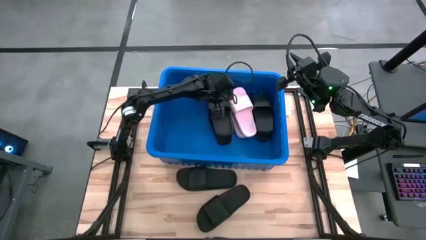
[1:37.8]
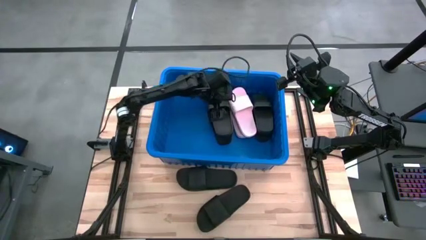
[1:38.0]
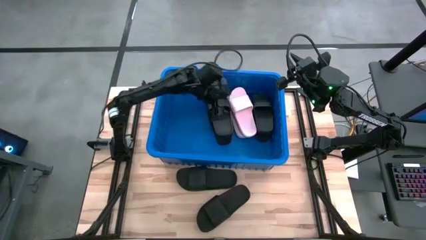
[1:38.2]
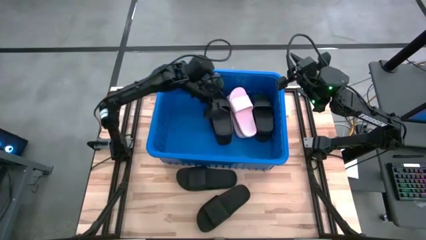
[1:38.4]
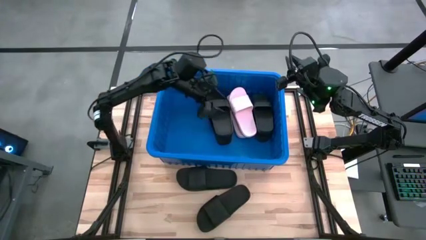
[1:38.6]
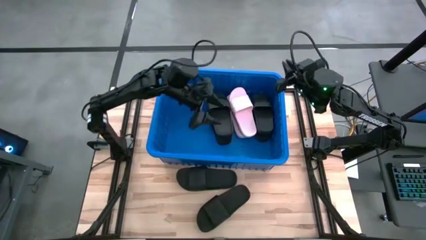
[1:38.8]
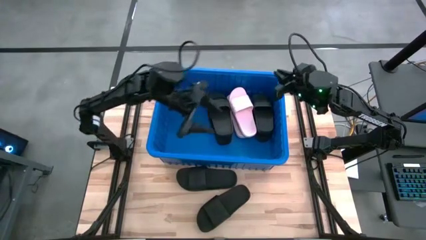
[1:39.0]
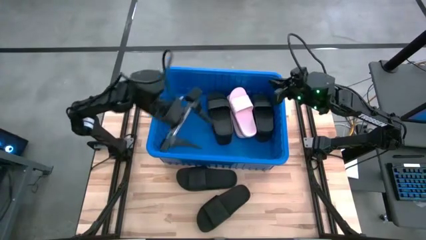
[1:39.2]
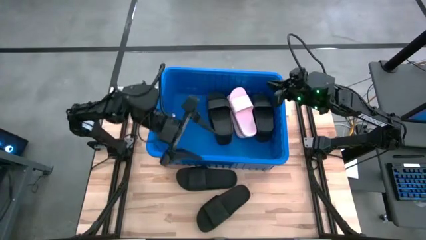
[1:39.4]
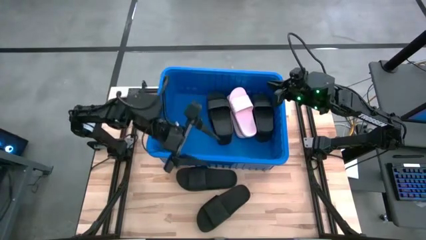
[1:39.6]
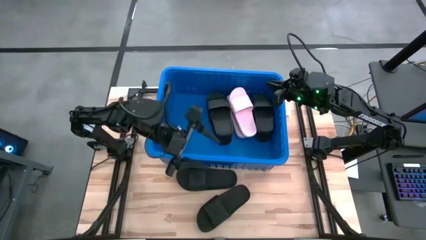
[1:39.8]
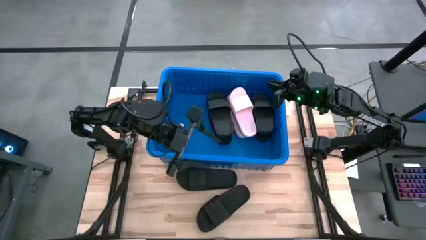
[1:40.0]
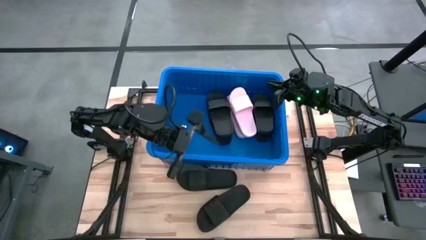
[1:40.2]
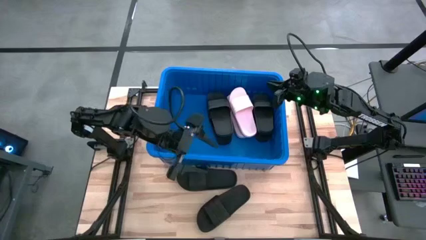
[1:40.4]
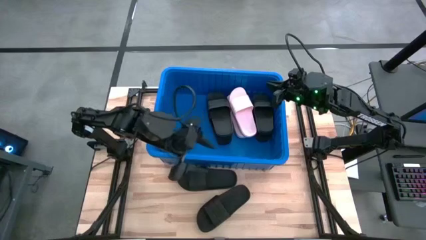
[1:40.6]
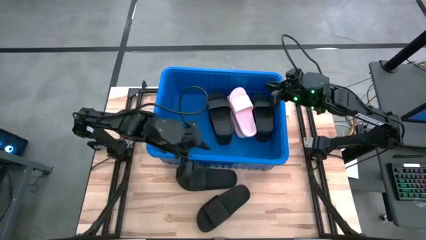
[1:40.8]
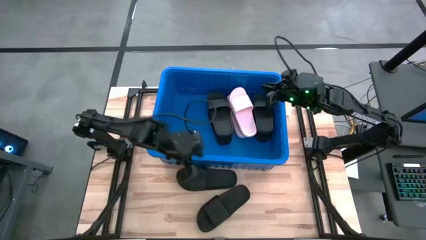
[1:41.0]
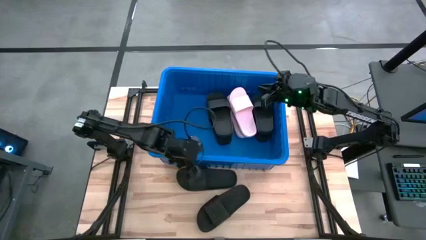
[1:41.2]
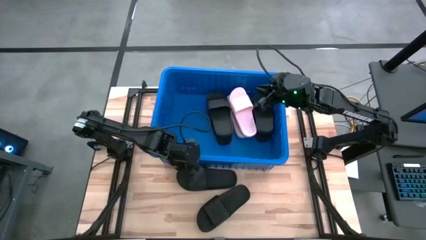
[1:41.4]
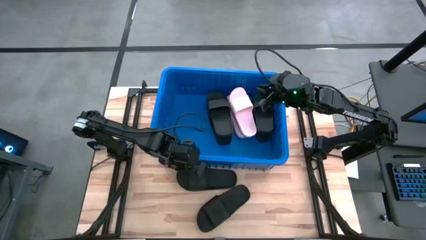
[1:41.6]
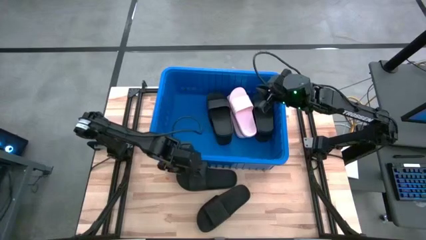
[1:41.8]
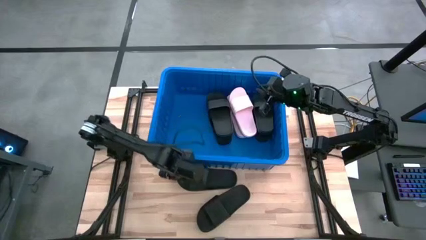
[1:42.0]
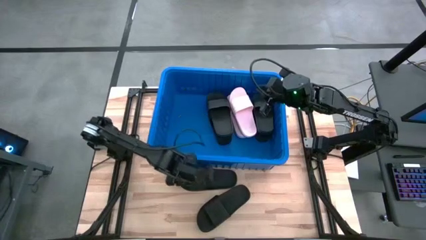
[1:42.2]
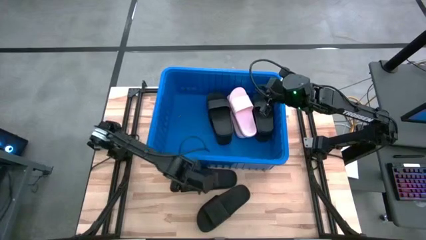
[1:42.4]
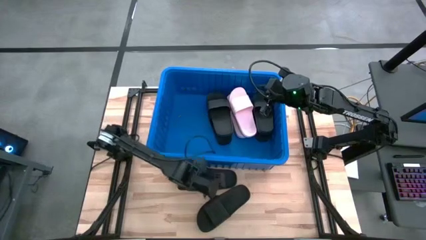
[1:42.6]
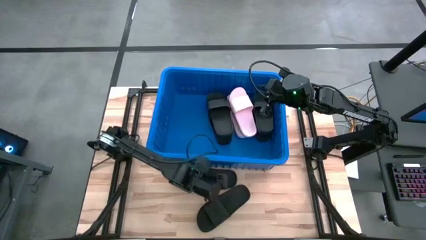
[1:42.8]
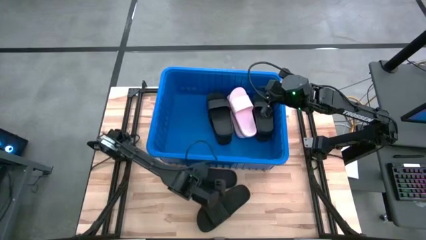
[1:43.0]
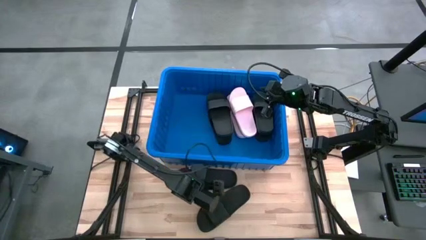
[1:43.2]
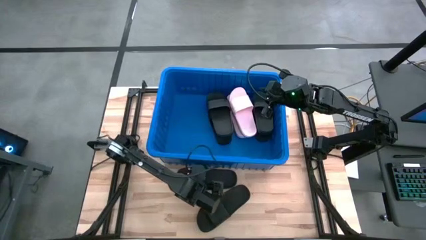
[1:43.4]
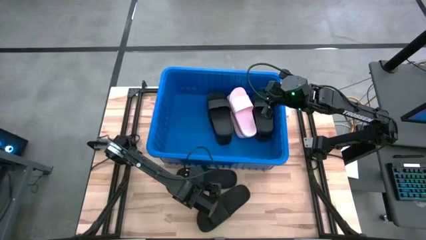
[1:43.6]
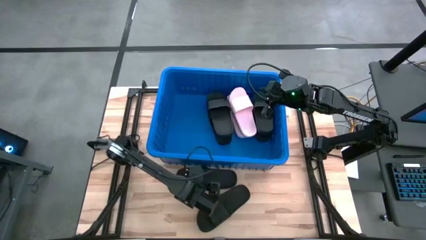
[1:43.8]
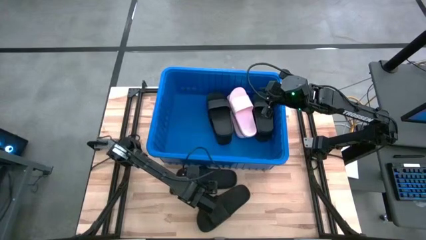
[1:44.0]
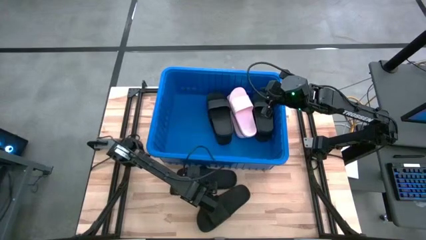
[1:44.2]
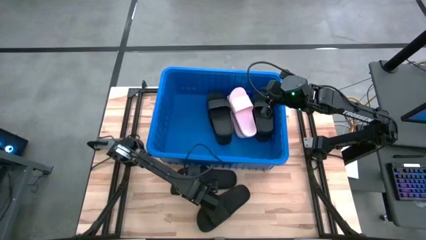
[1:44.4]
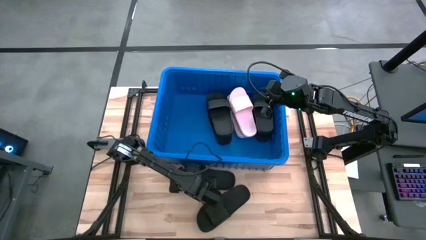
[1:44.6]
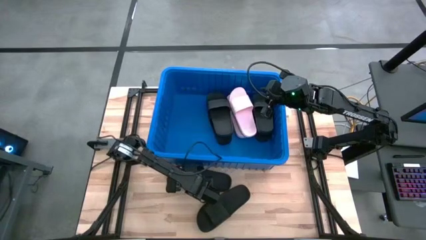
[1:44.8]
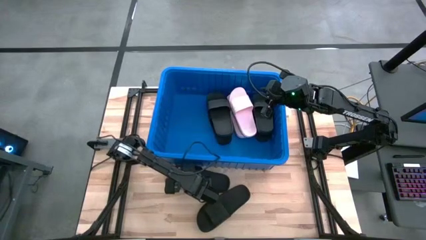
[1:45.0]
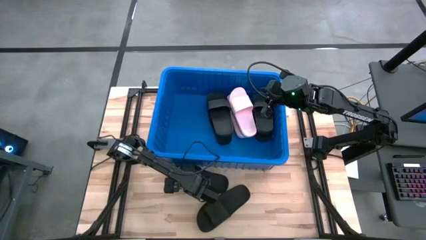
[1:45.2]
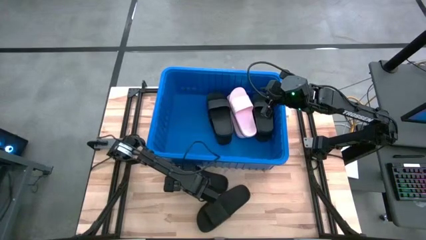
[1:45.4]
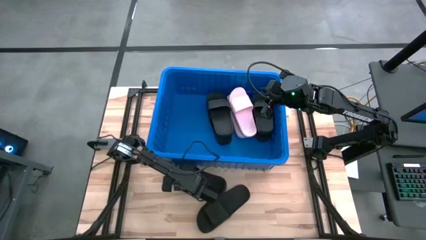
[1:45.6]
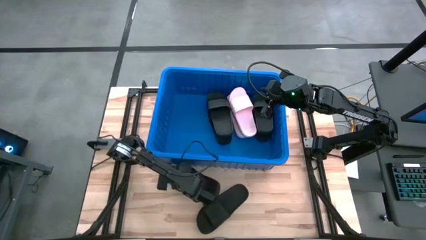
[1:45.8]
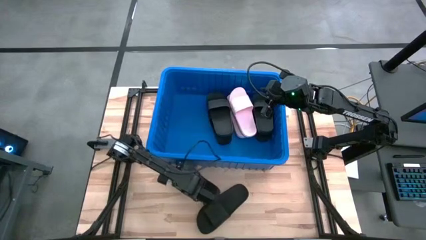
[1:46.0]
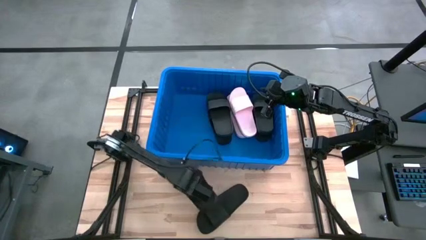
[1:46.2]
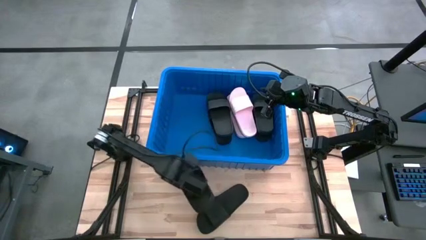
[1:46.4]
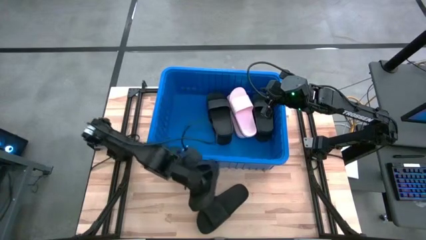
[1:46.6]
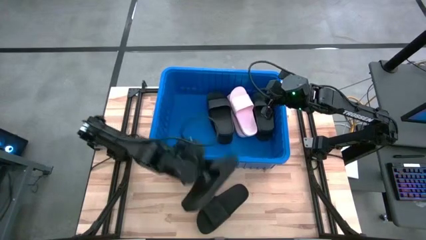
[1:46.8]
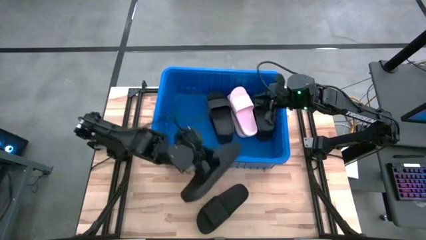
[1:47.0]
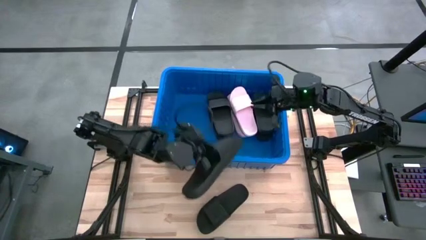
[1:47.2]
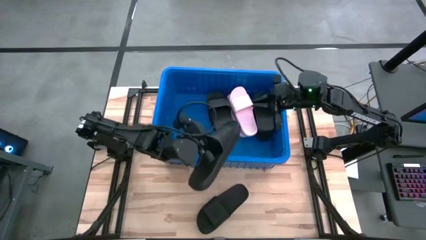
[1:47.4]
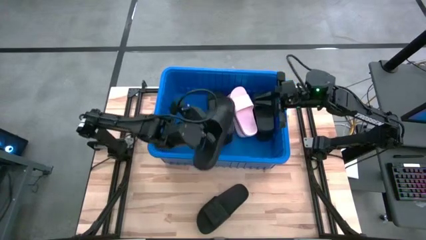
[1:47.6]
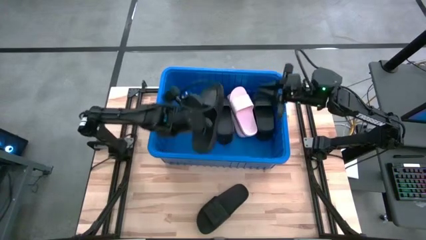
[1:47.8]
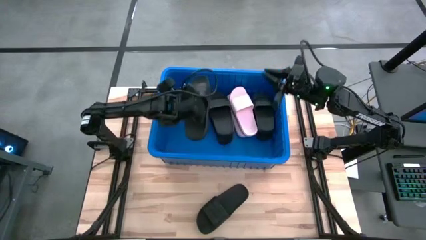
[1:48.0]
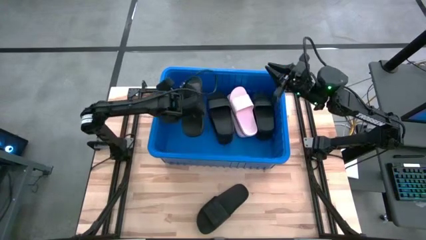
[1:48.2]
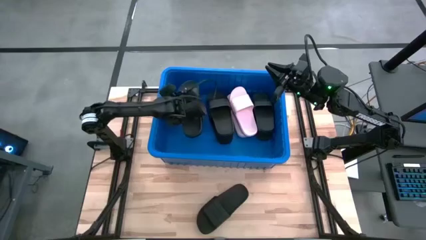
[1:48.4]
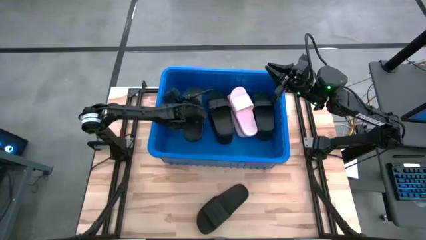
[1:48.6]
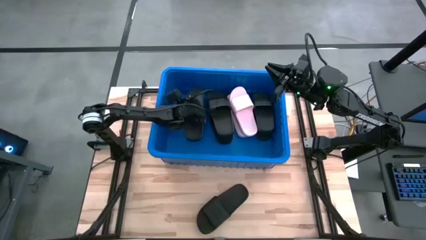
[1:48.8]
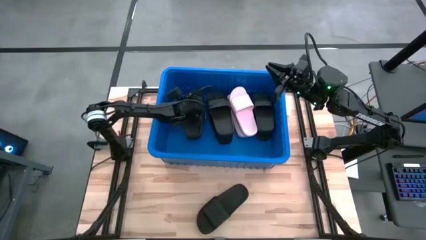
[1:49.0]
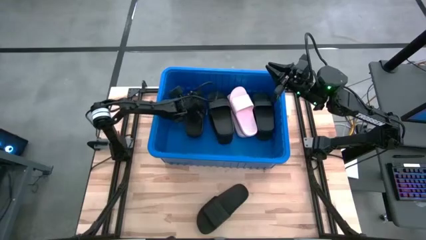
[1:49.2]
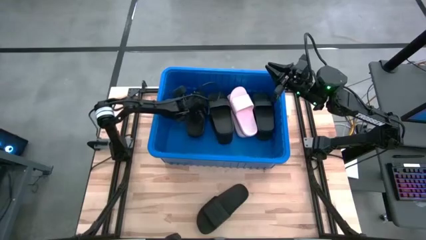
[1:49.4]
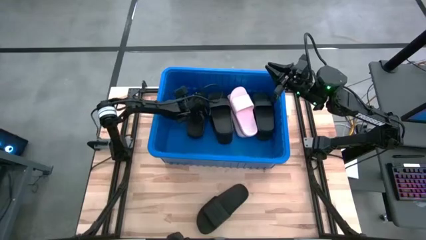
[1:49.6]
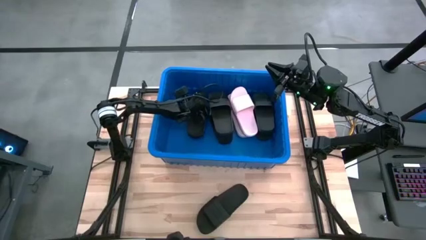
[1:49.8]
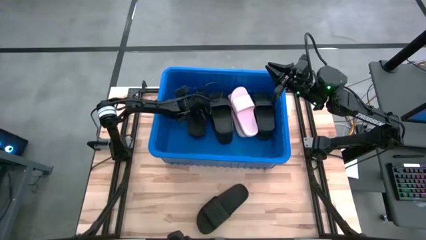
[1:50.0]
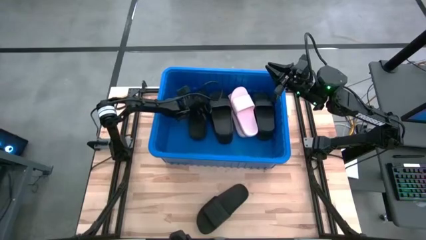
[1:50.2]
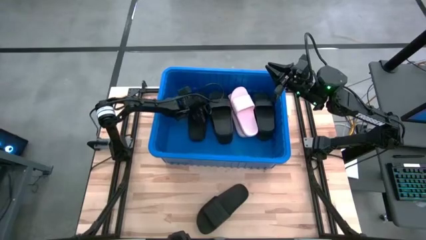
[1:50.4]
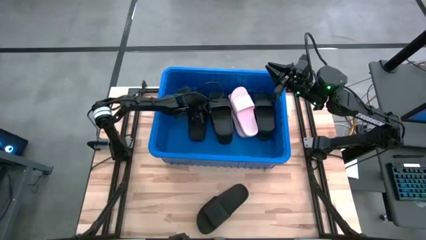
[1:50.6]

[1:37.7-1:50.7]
Task: Pick and place slides into bin
Put the black slide into the blue bin
